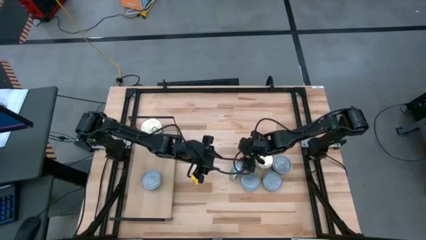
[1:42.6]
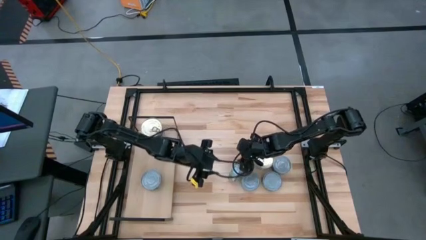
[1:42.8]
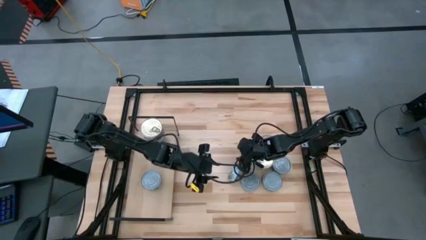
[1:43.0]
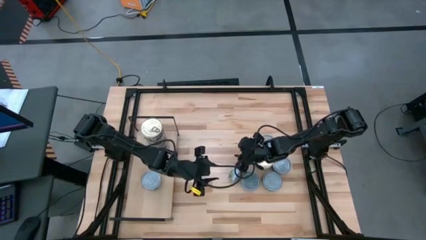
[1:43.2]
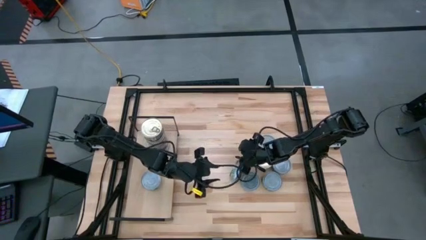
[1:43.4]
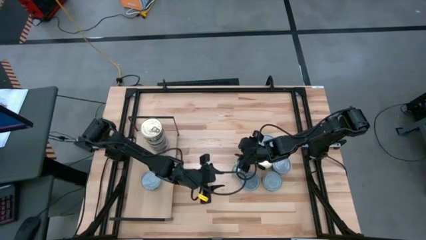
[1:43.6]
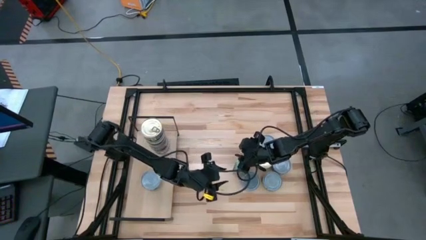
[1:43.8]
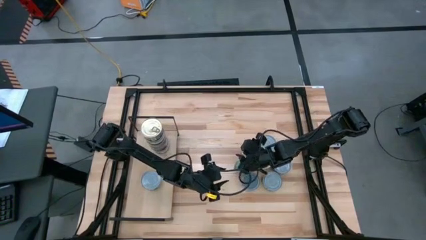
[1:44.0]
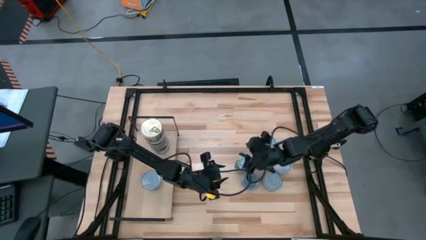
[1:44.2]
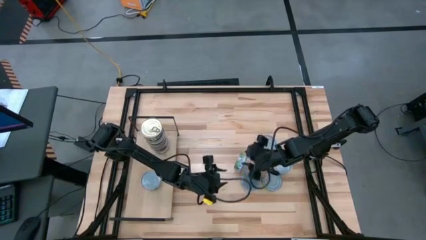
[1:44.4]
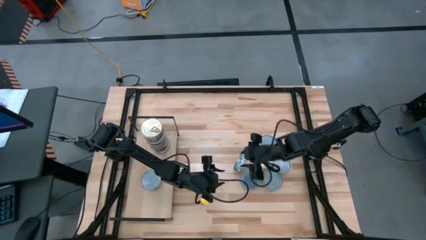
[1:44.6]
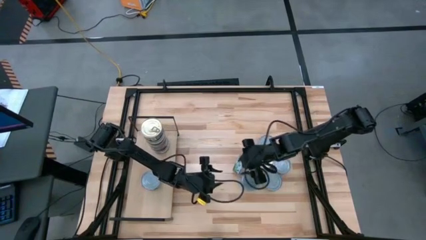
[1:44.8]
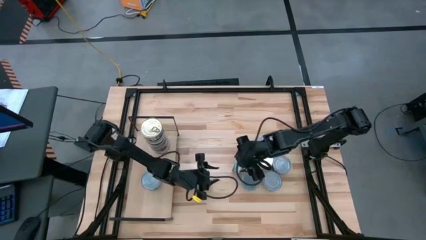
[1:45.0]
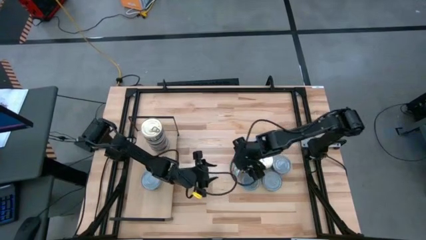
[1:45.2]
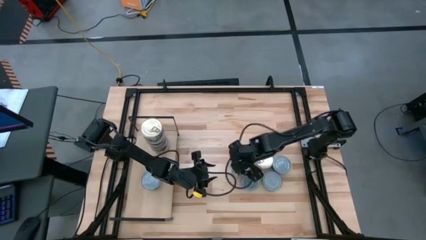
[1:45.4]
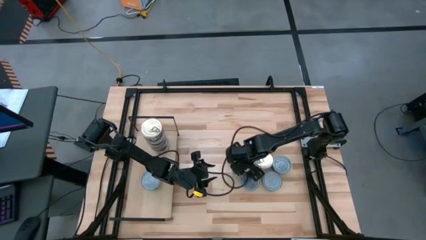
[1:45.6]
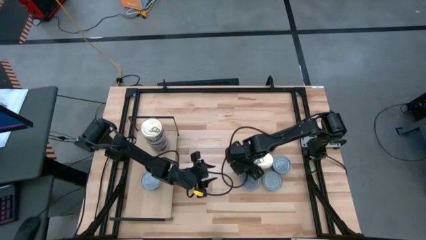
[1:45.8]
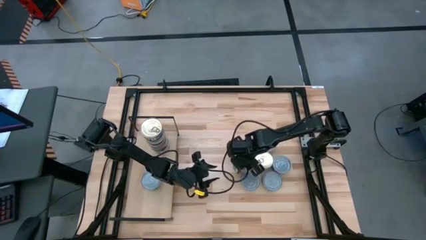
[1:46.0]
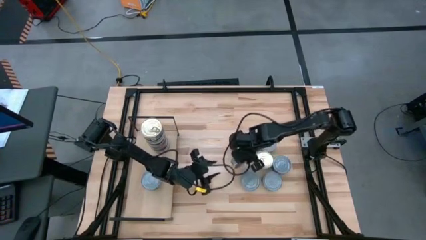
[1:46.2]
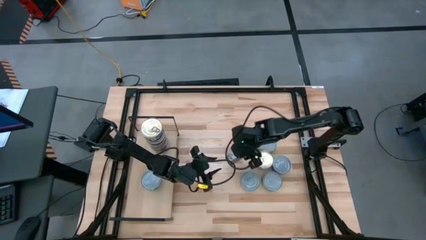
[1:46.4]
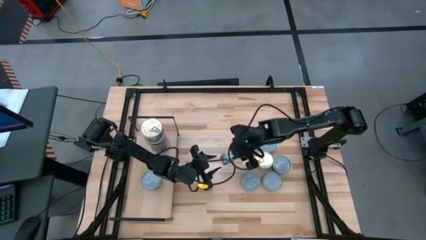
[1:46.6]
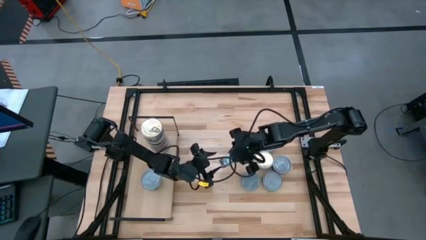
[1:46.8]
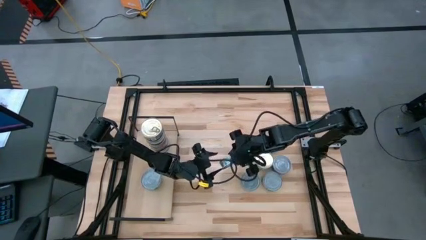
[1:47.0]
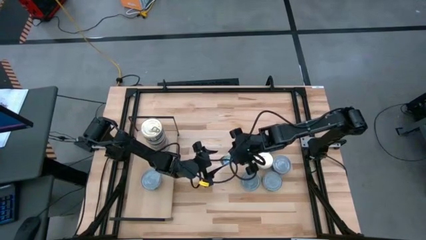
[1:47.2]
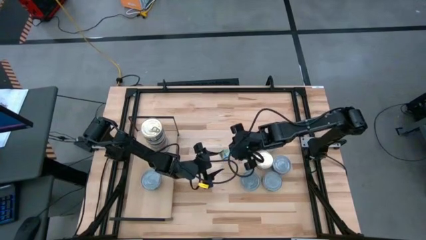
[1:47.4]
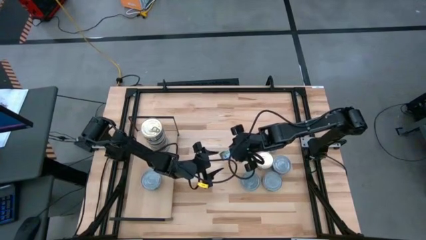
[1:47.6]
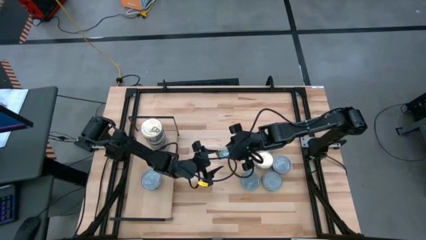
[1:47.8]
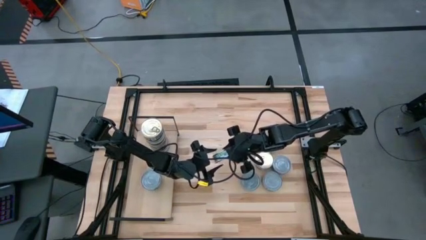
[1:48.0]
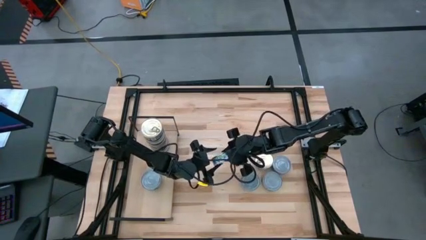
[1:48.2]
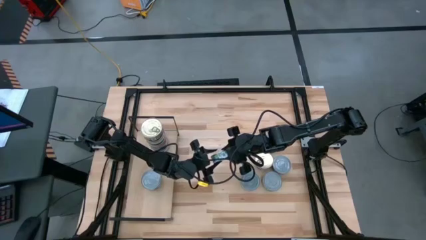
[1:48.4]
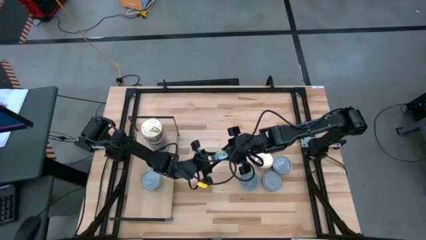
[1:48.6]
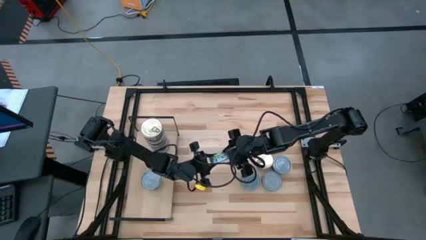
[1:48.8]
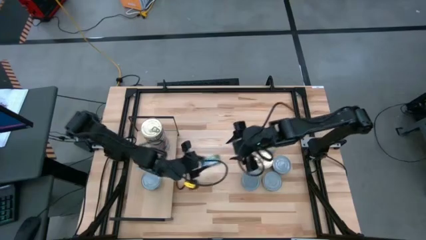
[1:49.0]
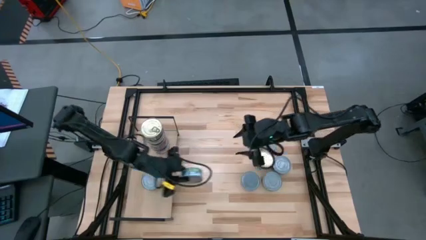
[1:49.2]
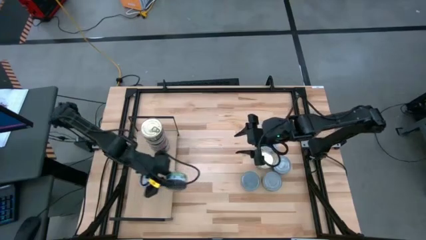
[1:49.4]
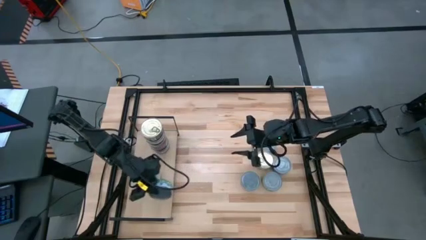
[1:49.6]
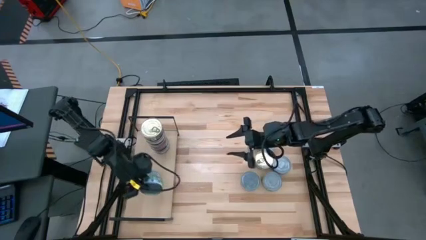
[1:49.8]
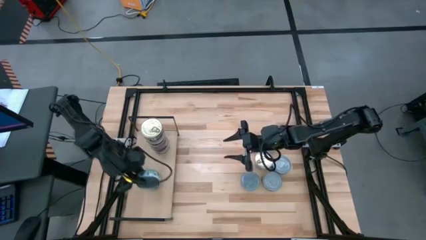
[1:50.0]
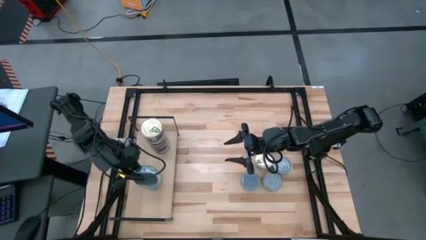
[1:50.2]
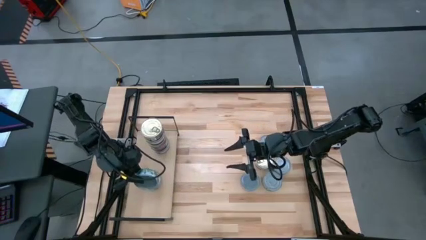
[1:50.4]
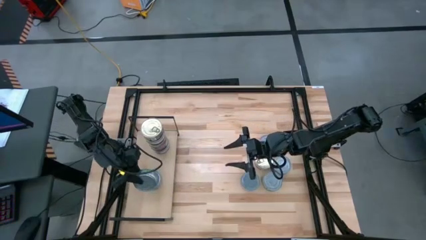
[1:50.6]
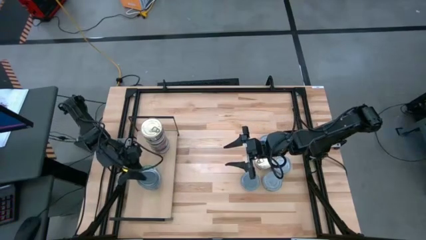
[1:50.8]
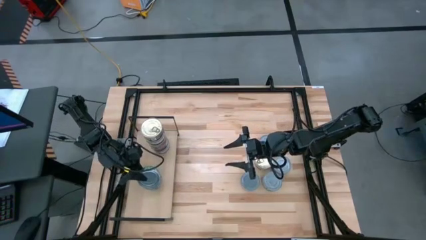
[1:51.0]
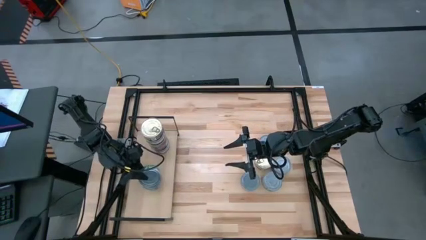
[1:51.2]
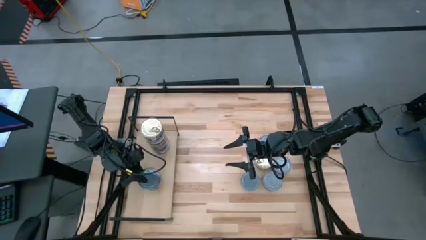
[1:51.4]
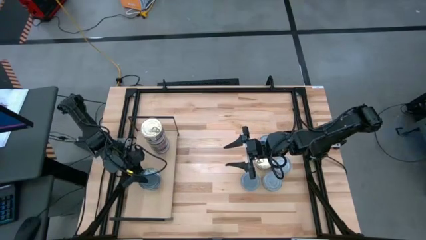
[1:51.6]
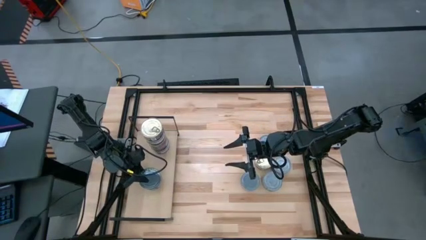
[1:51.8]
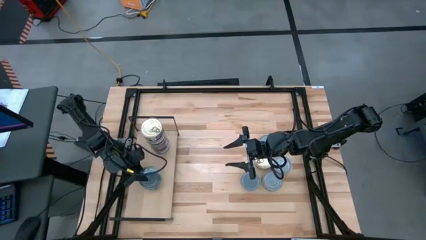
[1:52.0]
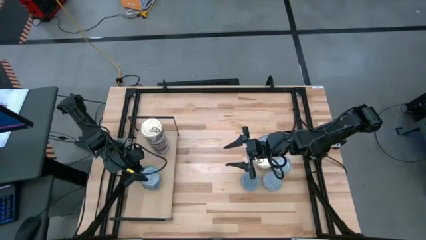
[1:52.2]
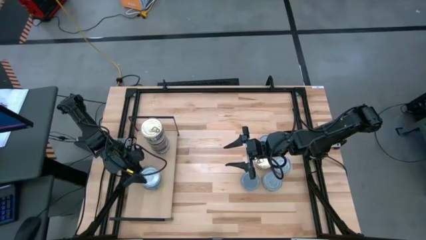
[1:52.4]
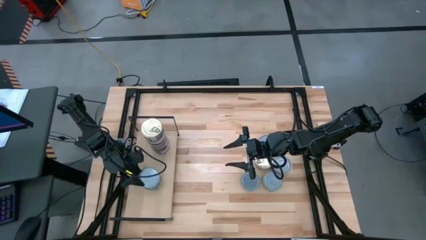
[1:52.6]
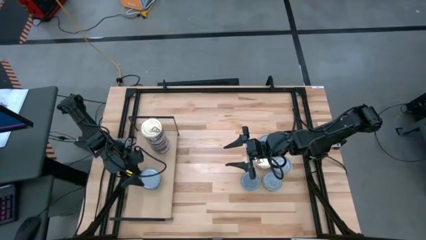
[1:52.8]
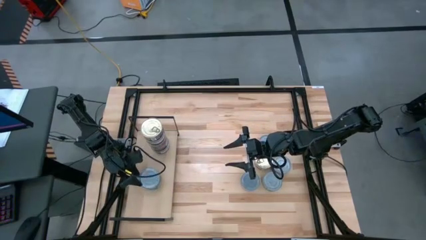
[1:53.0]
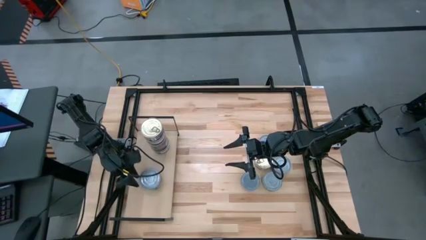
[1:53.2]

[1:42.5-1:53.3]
Task: Stack canned seafood by type on shelf
Stack the green and white tuna can on the green and white tuna can on the shelf
